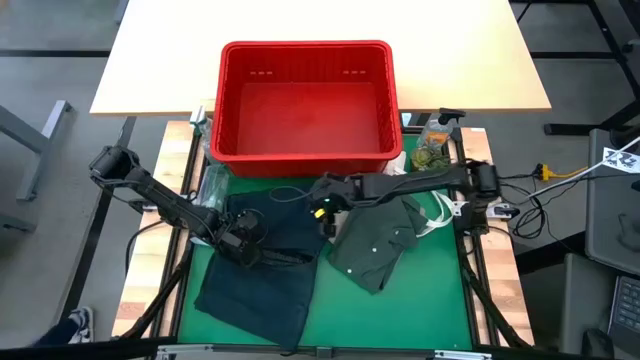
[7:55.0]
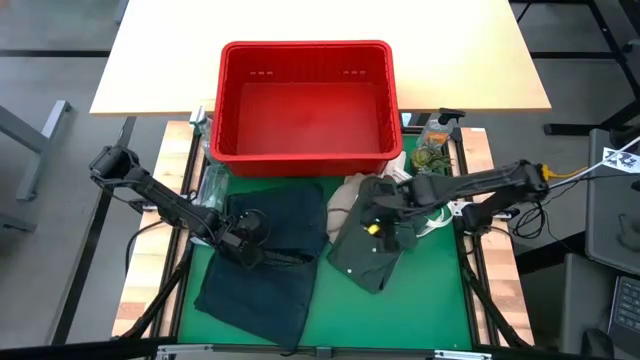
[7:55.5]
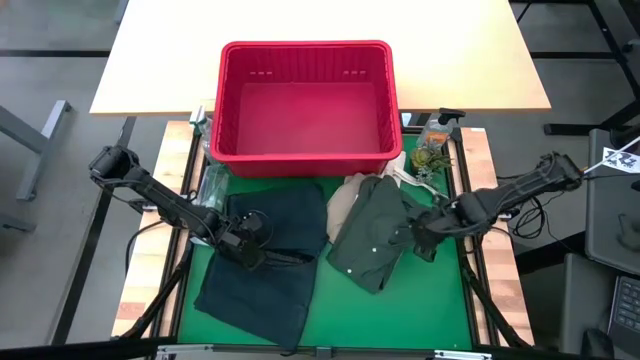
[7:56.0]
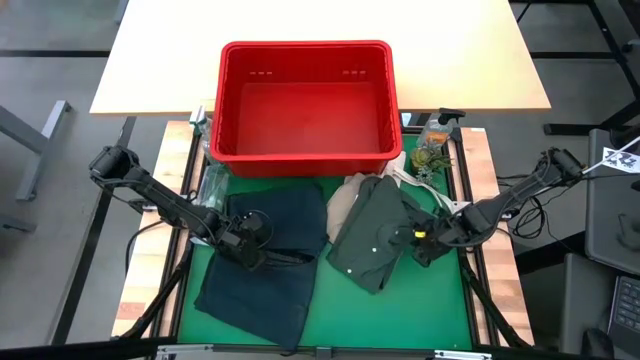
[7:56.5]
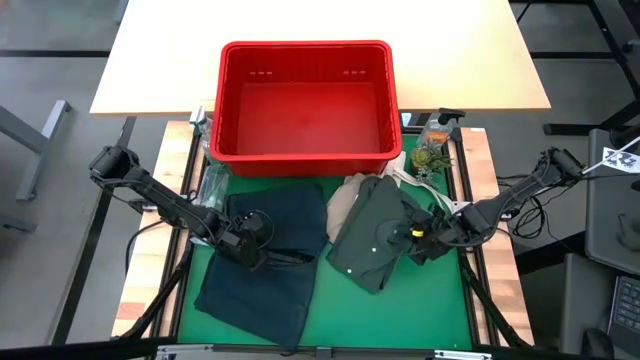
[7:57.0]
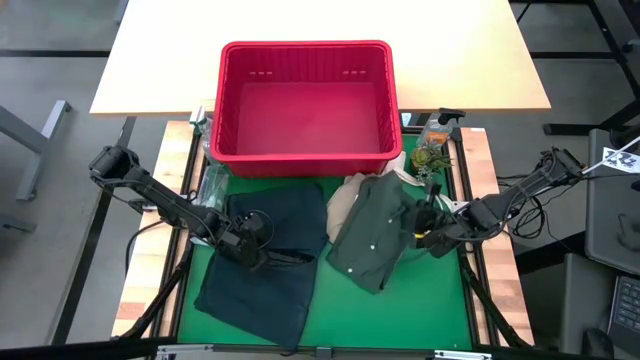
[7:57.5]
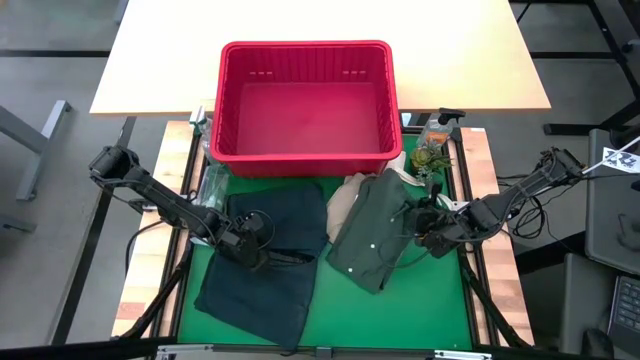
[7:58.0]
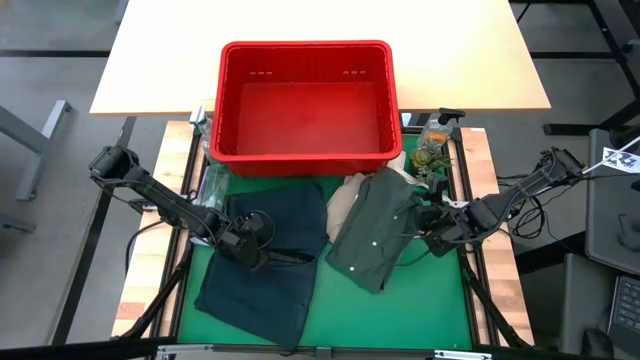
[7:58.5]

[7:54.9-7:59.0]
Task: Fold laundry
Adjust the folded green polo shirt

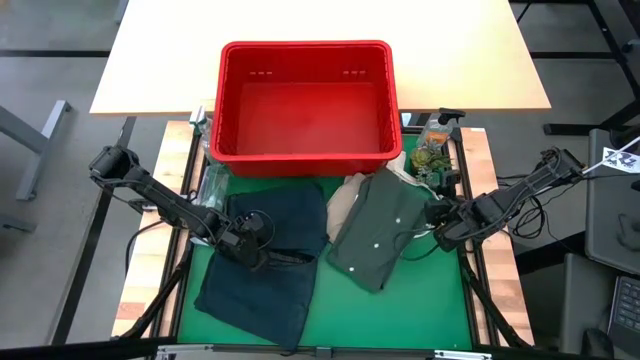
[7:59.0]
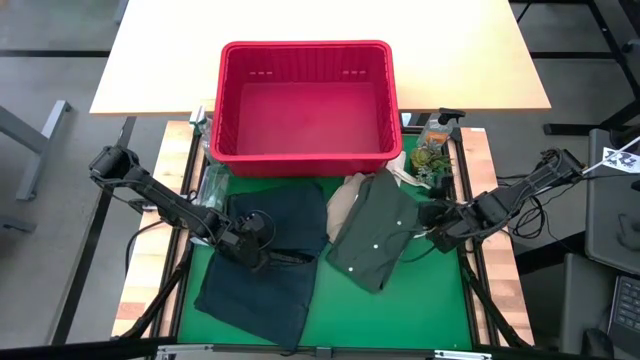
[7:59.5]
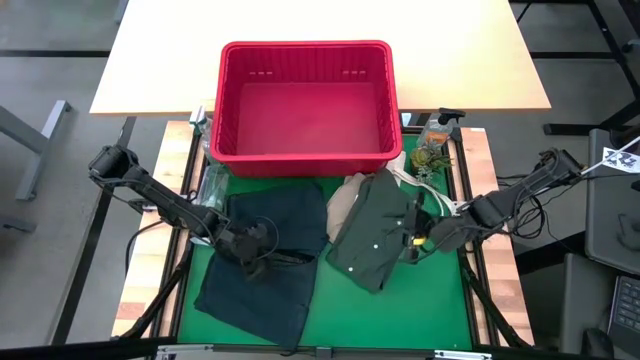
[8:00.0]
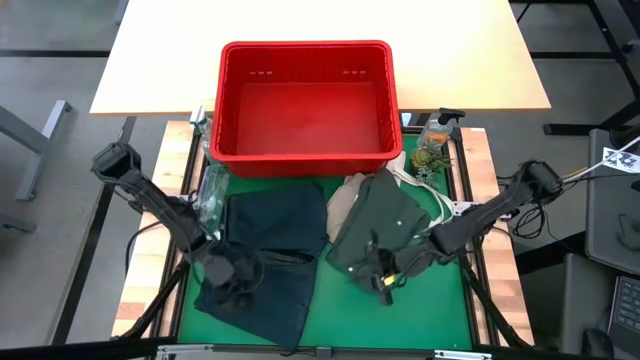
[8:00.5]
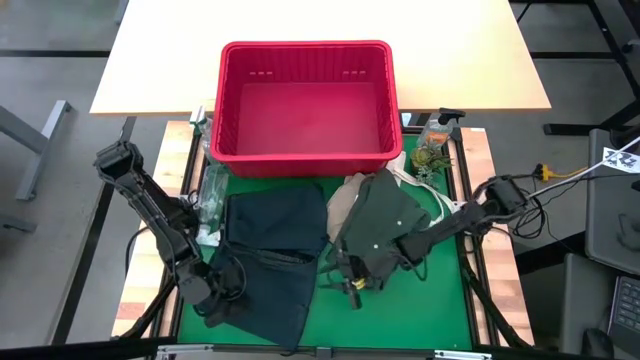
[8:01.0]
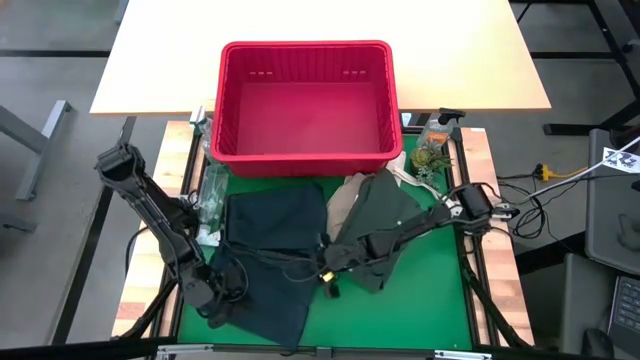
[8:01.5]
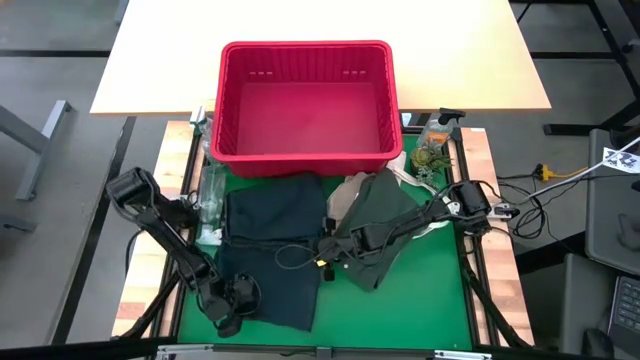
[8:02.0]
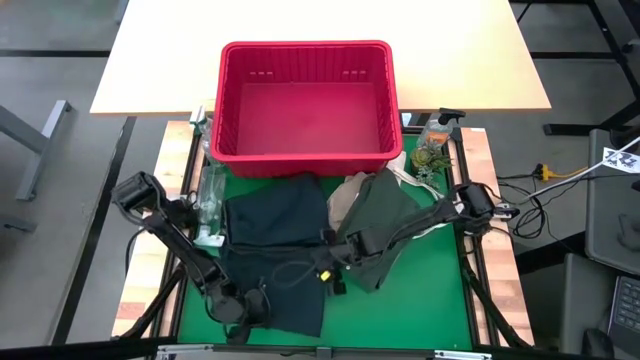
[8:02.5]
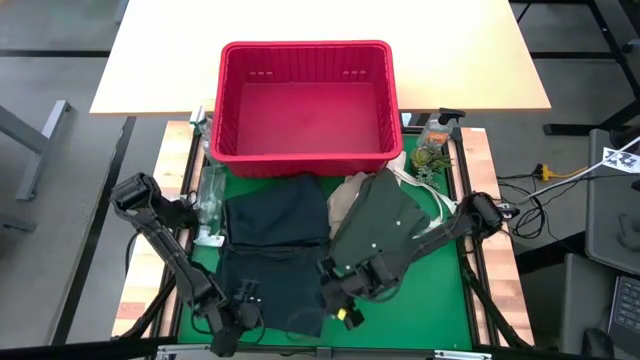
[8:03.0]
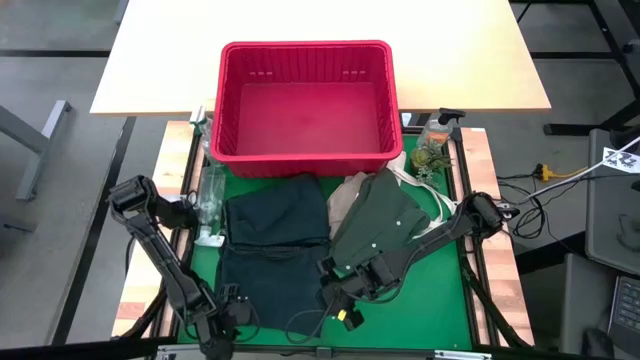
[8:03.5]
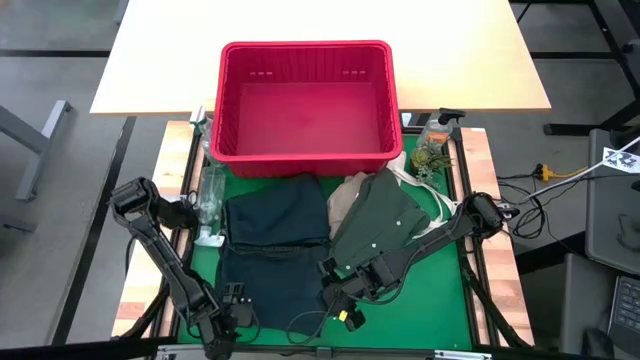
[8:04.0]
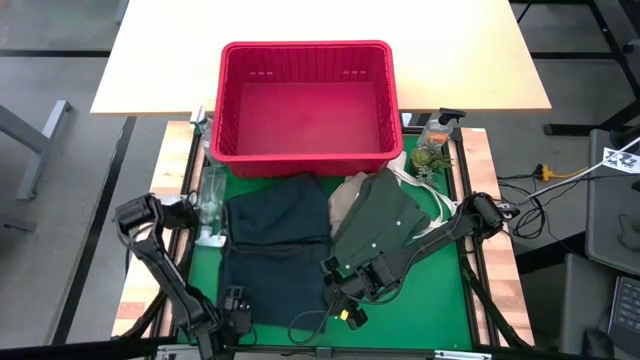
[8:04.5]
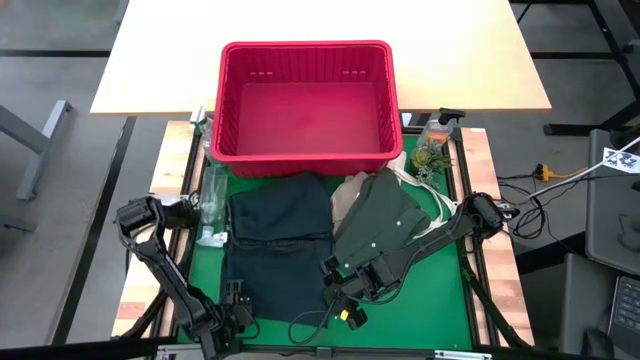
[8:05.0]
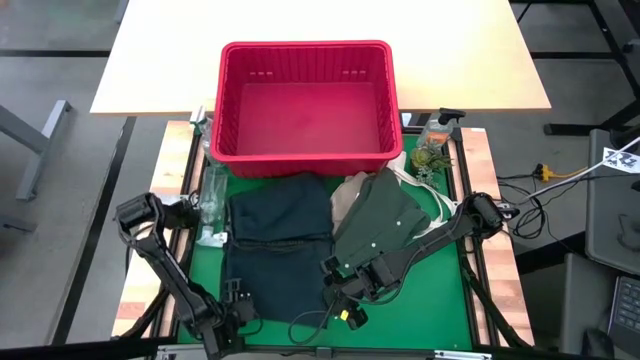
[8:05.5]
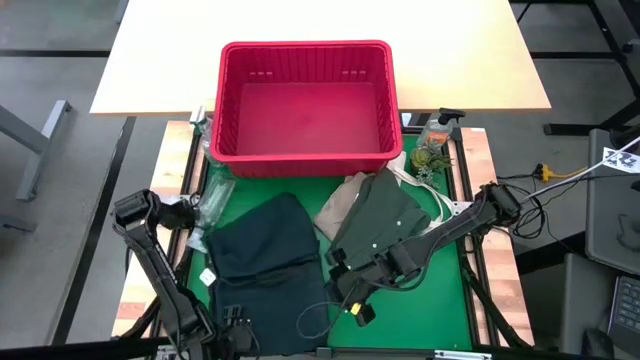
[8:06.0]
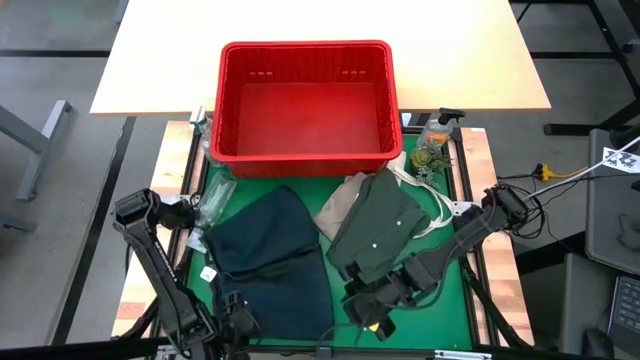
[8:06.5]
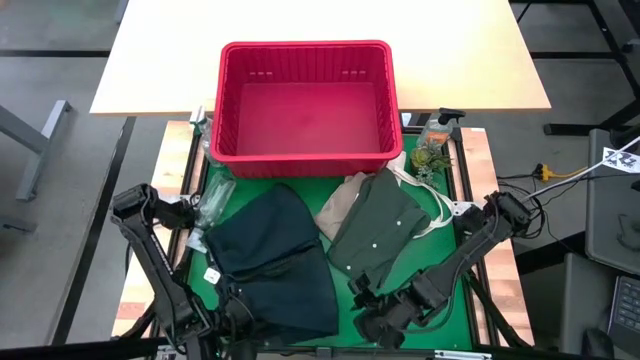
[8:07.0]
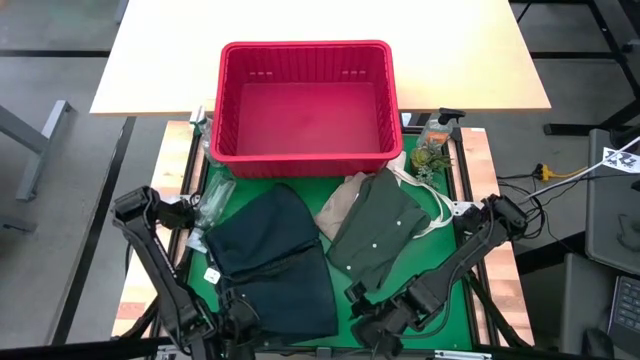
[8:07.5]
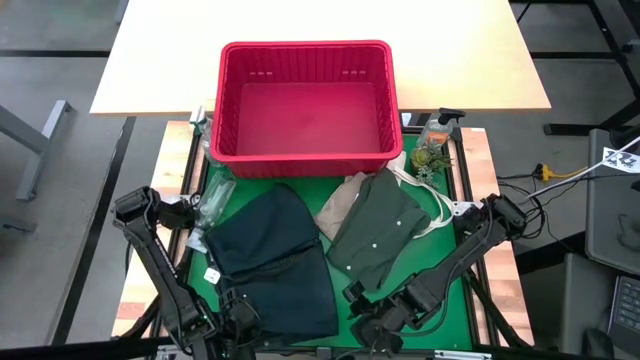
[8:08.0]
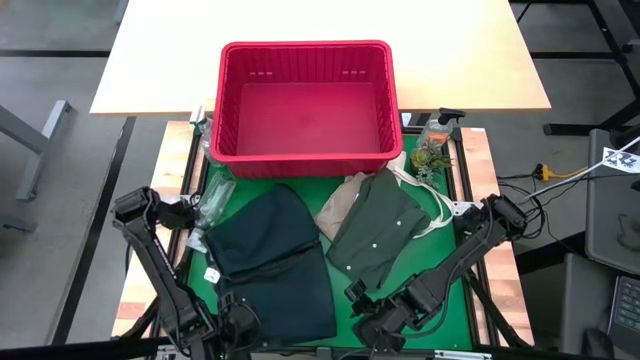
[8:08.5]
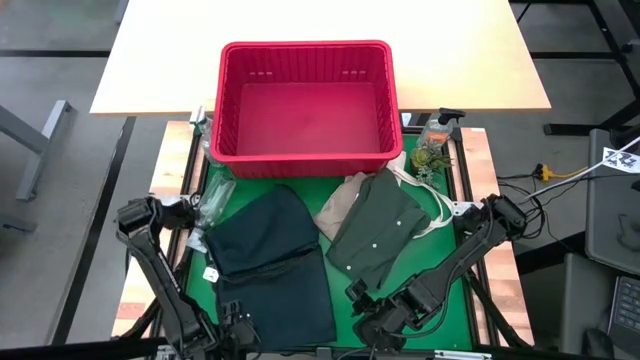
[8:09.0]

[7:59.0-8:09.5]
Fold the dark blue pants

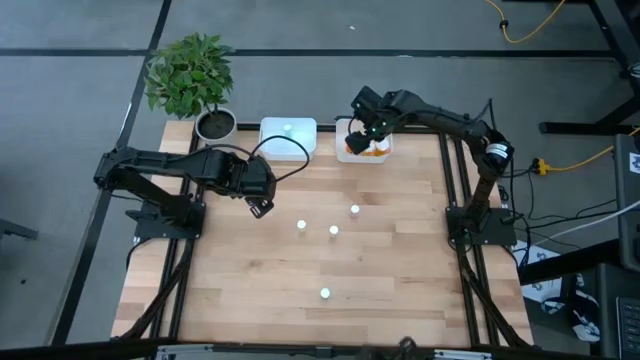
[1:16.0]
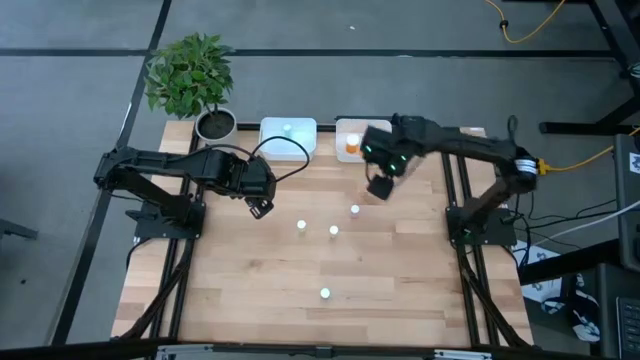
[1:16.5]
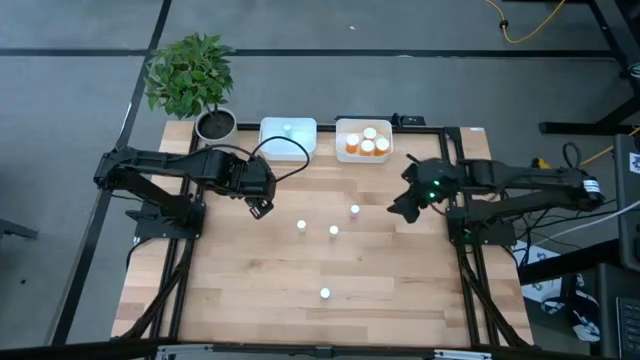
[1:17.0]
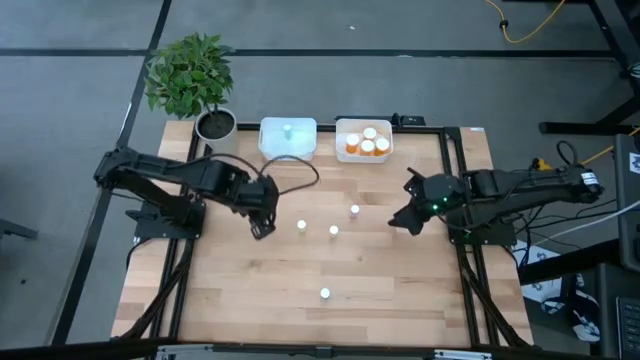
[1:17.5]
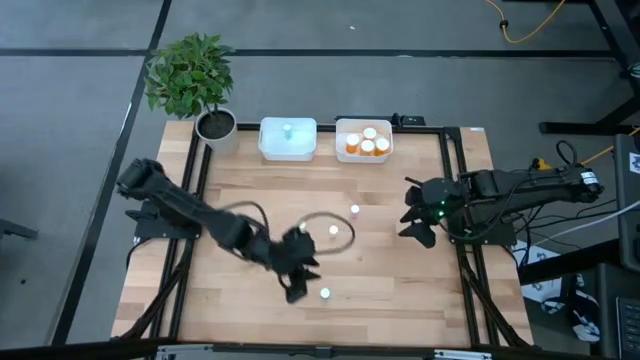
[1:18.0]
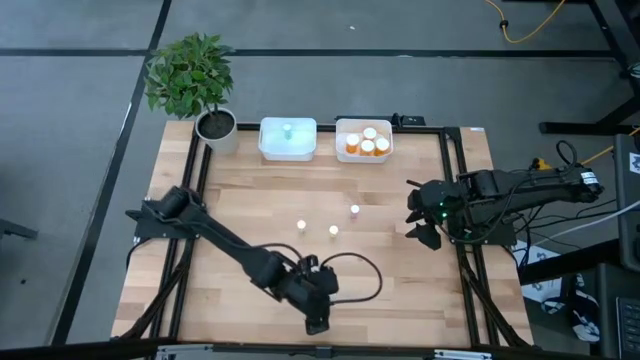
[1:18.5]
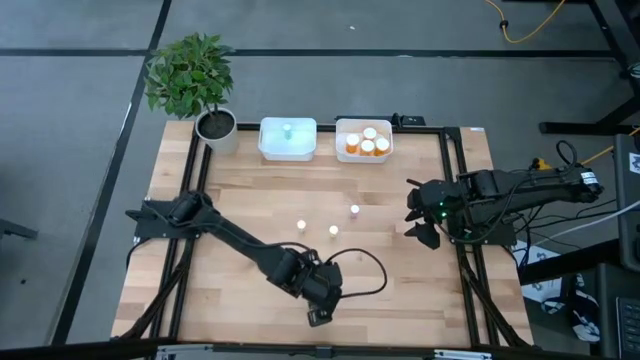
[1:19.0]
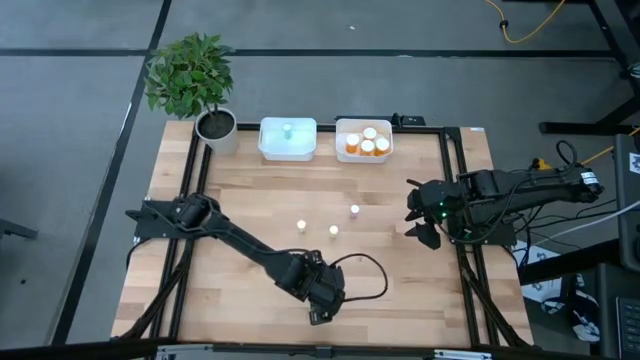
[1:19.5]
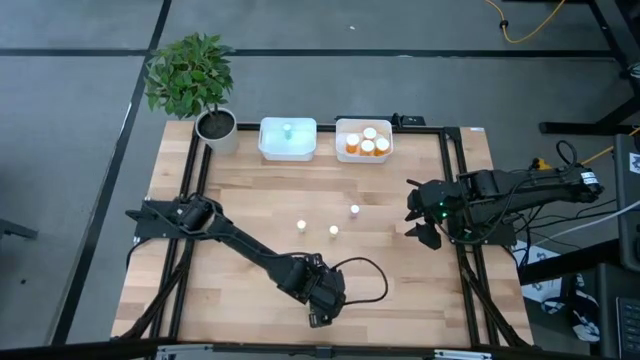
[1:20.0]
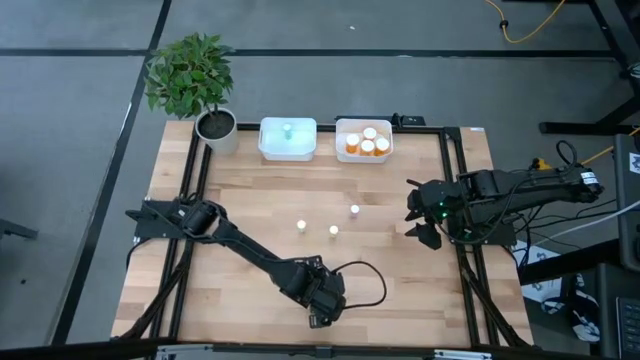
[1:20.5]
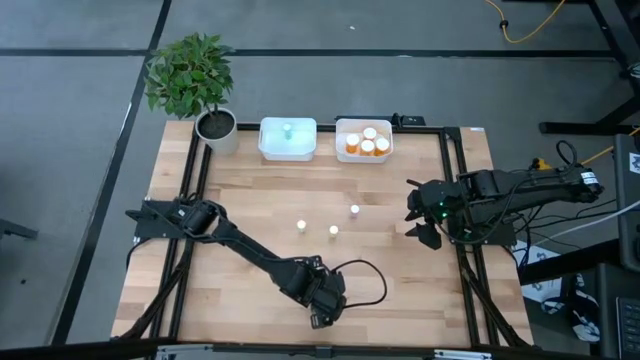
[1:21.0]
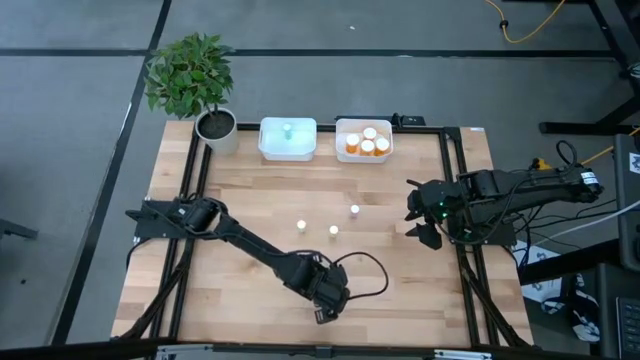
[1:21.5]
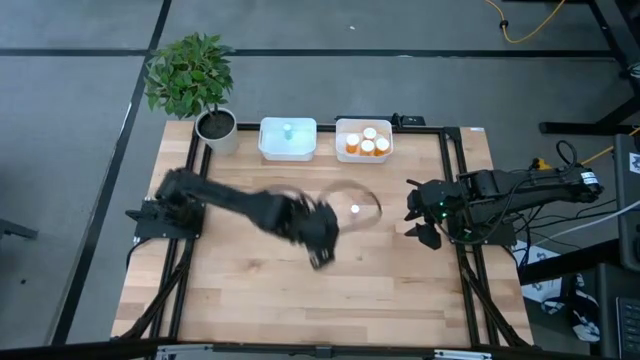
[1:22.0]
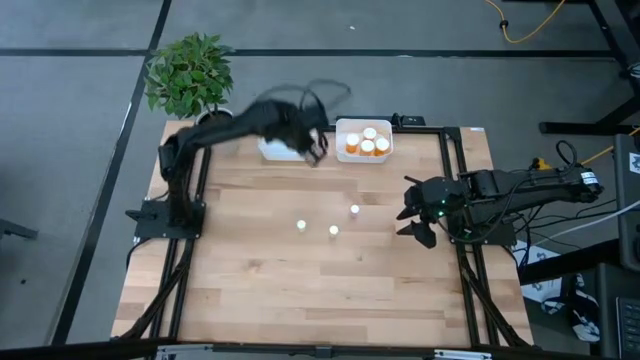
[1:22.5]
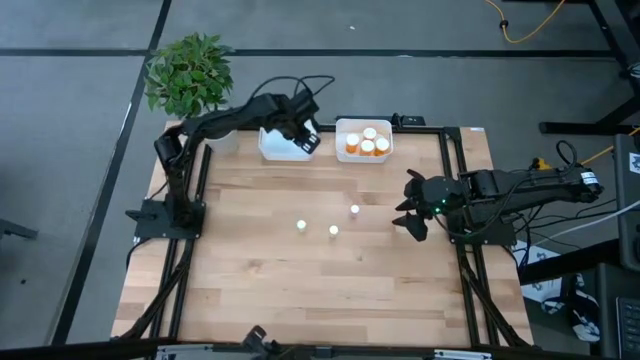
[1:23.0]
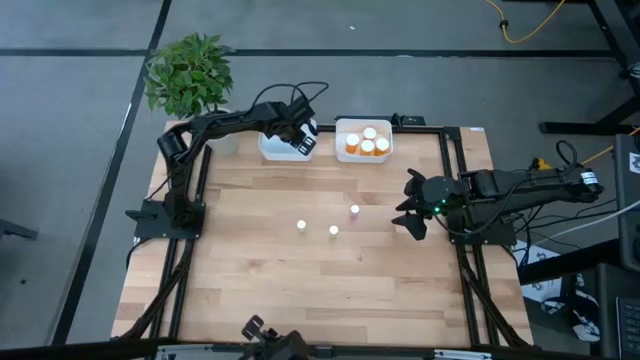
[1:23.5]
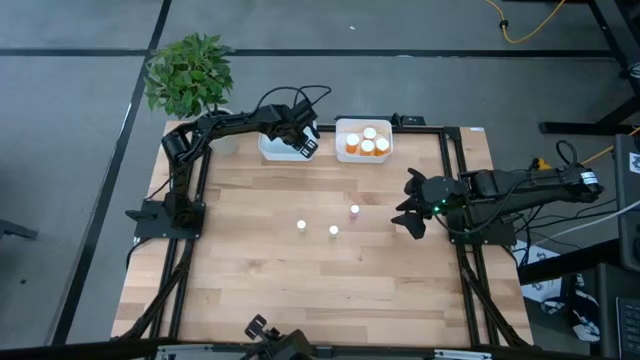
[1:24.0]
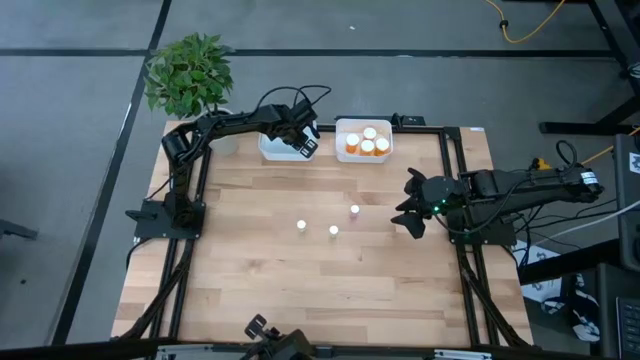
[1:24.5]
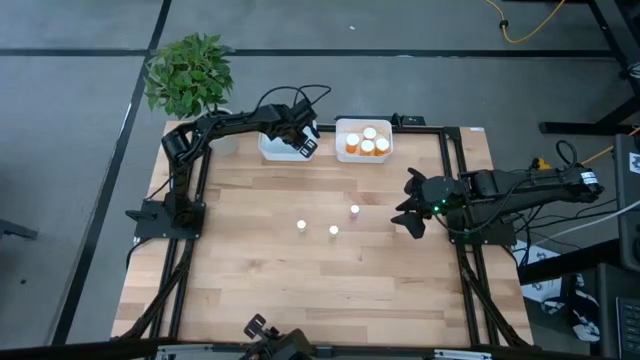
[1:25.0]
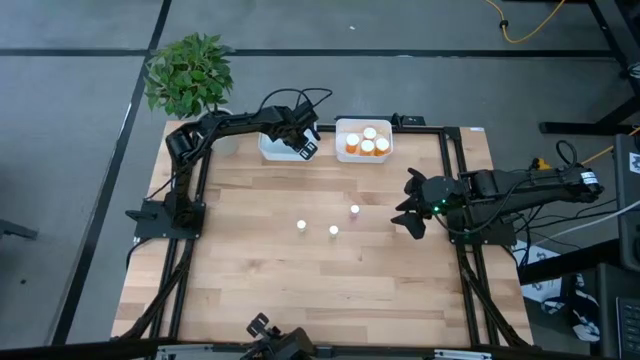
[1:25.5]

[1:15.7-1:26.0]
Task: Pick and place medicine bottles into bin by pill shape (circle, oval)
Put the blue tablet bottle into the left white bin
